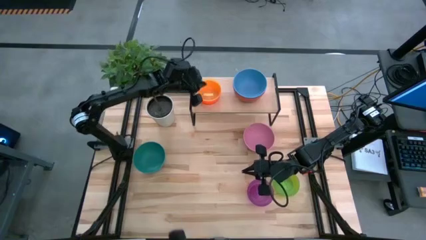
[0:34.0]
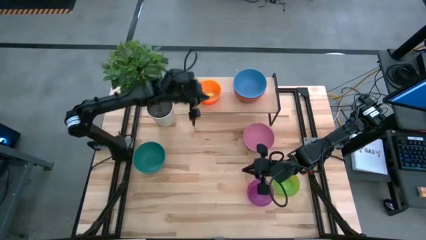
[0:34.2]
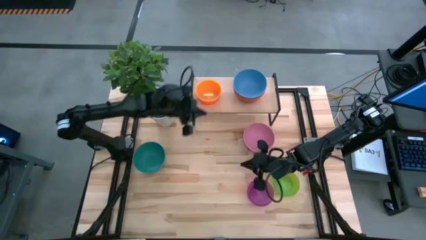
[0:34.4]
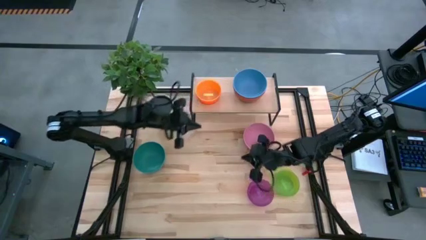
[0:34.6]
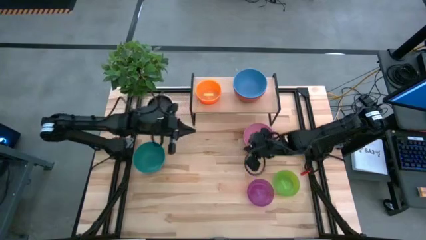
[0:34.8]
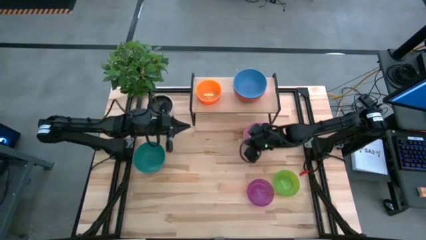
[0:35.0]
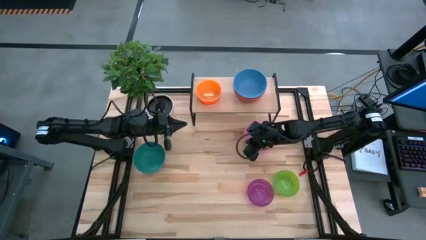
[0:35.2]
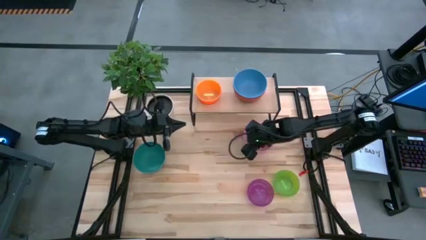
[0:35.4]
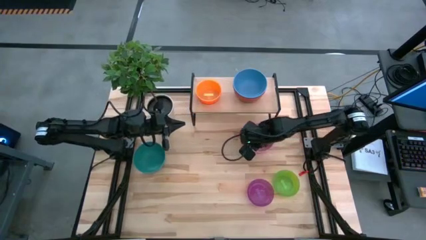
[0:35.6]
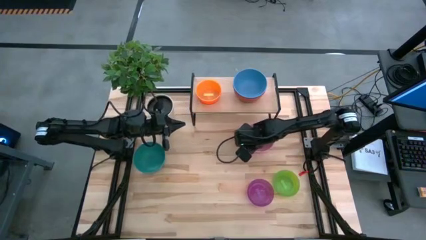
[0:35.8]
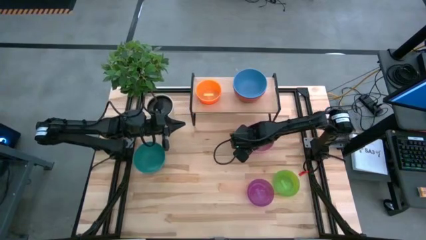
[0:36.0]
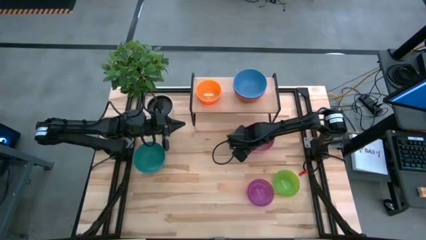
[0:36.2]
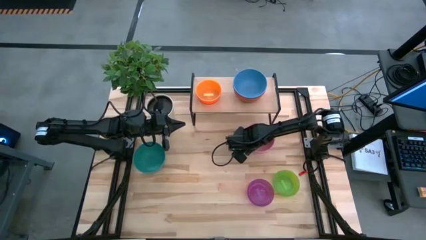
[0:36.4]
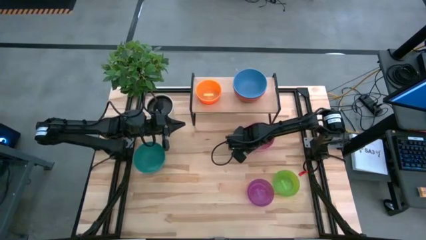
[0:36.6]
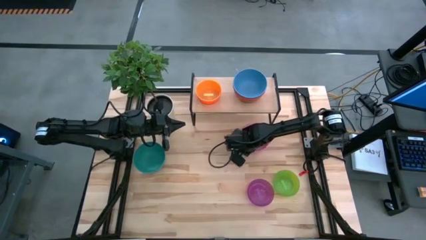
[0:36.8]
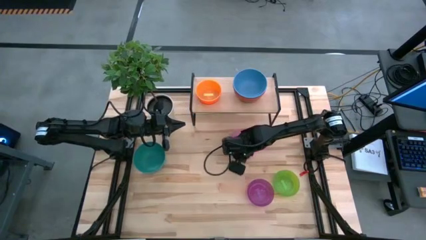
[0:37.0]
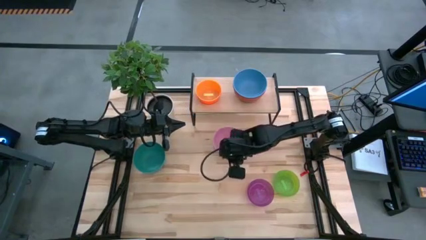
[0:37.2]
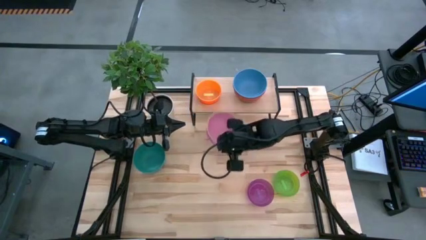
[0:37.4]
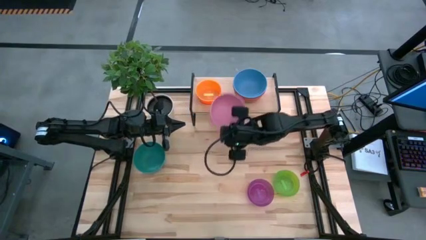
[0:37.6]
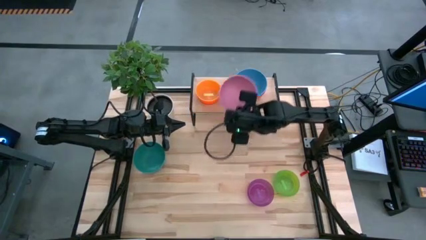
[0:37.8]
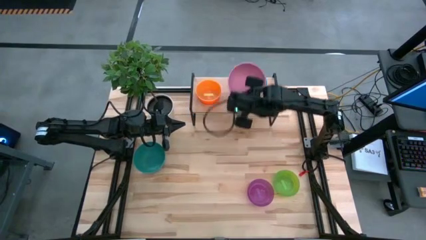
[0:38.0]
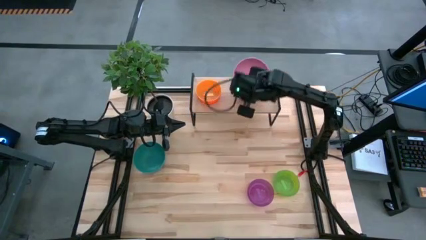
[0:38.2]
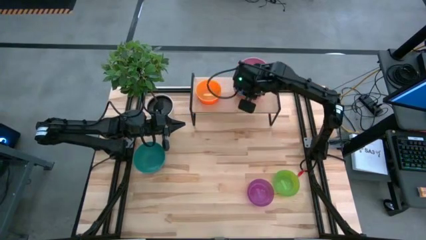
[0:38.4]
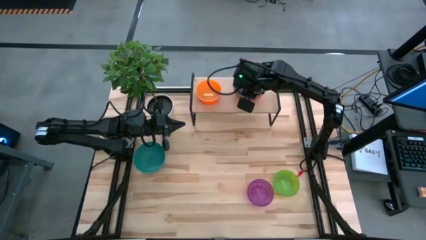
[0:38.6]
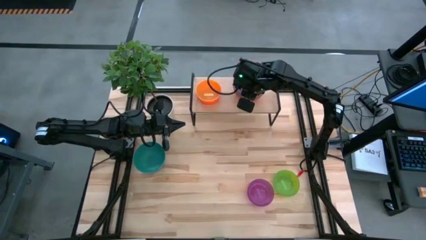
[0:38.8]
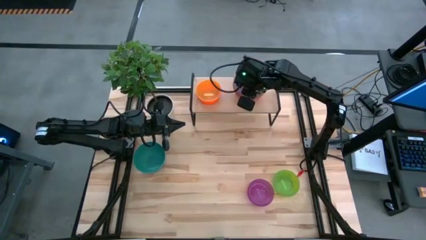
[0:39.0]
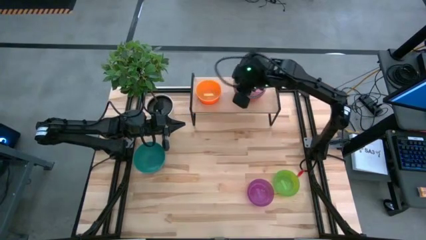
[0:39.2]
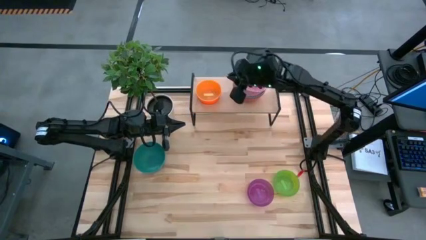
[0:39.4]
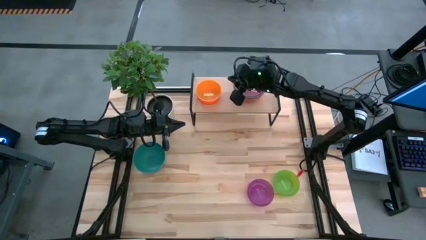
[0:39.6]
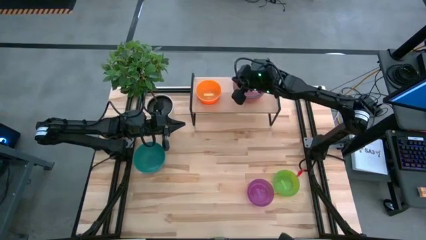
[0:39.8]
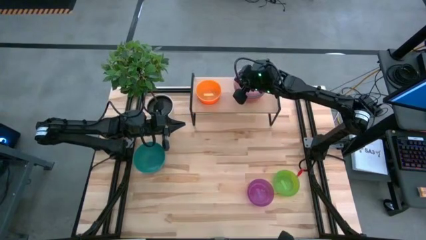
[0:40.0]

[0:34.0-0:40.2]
Task: Place and stack bowls onto a shelf
Stack the pink bowl into the blue bowl on the shelf

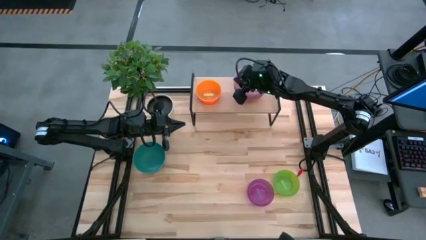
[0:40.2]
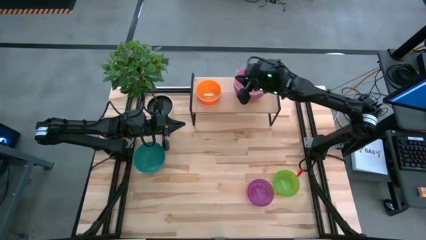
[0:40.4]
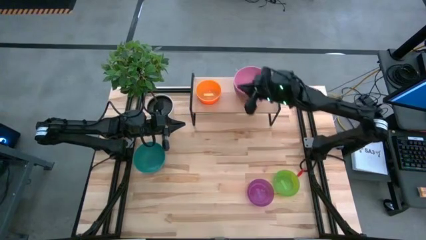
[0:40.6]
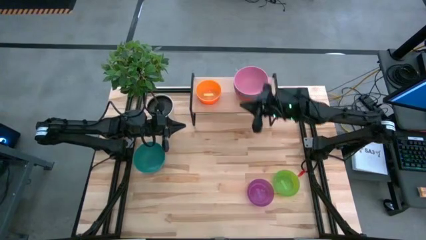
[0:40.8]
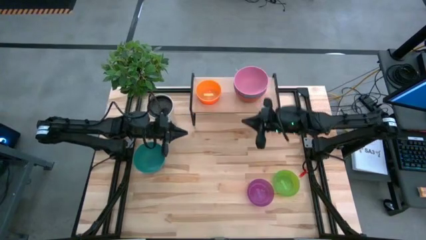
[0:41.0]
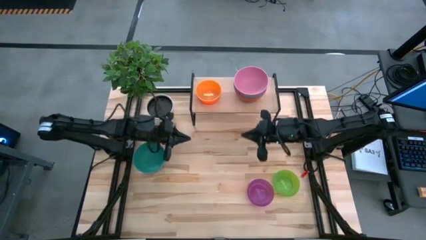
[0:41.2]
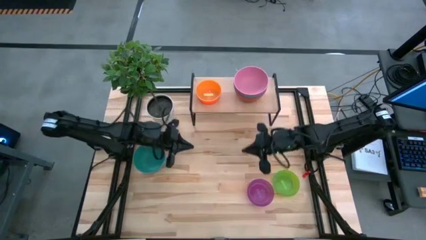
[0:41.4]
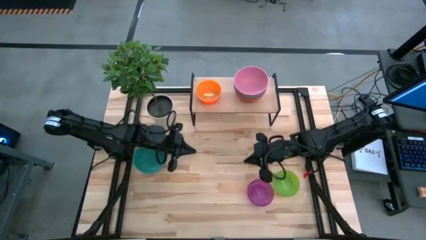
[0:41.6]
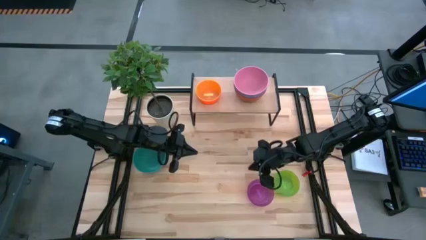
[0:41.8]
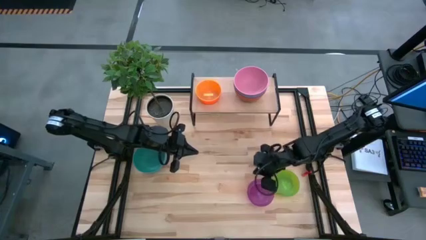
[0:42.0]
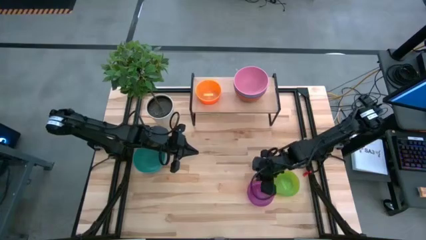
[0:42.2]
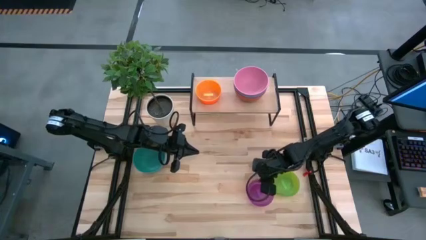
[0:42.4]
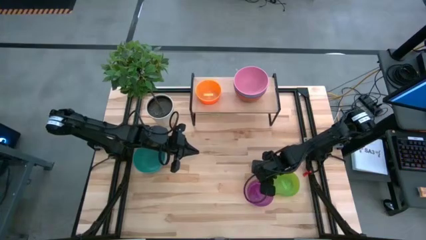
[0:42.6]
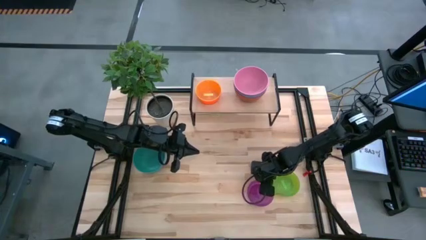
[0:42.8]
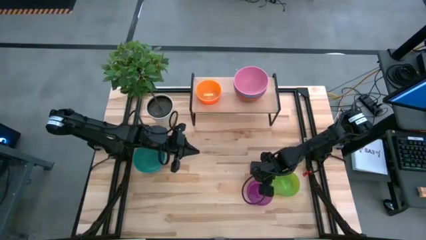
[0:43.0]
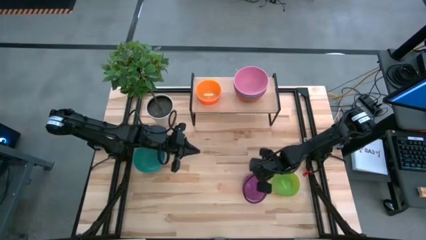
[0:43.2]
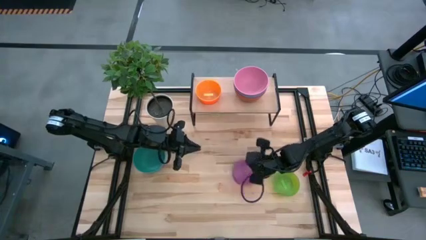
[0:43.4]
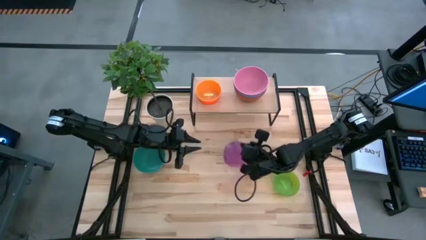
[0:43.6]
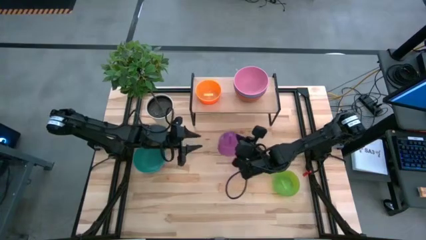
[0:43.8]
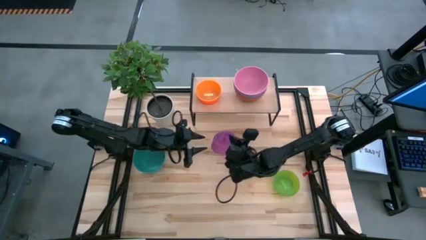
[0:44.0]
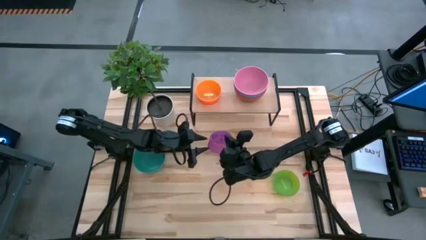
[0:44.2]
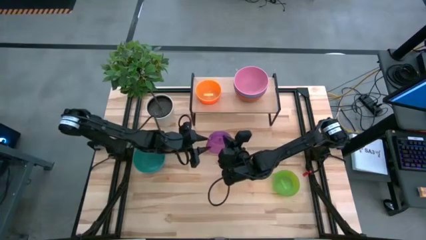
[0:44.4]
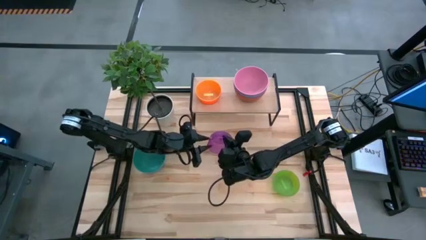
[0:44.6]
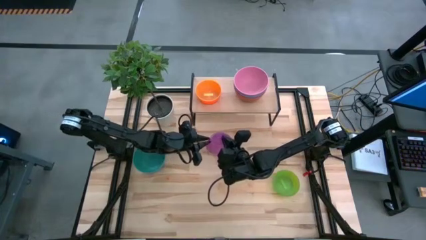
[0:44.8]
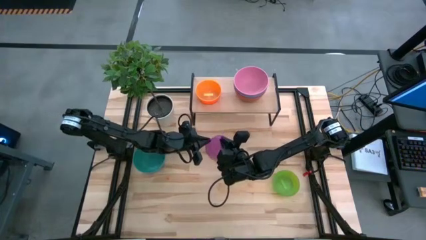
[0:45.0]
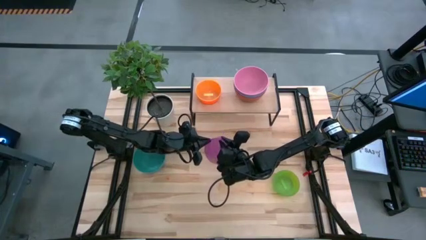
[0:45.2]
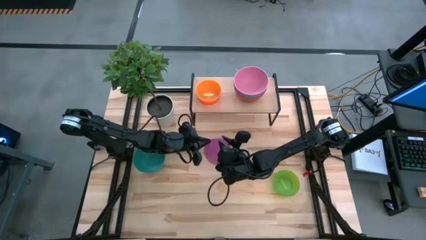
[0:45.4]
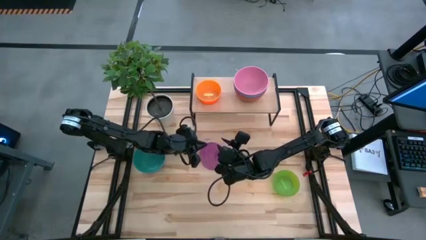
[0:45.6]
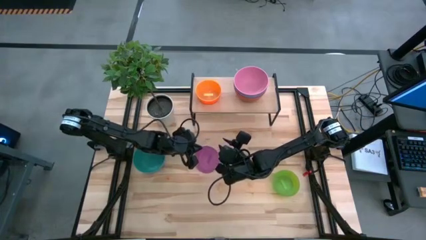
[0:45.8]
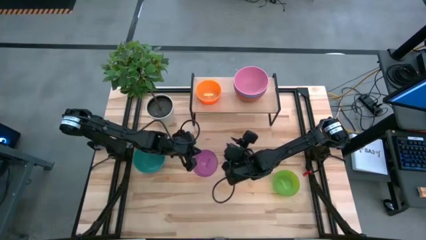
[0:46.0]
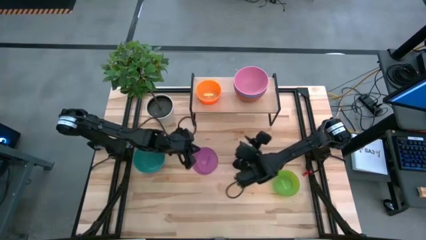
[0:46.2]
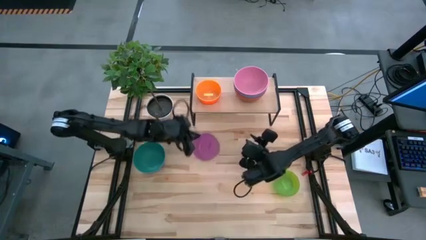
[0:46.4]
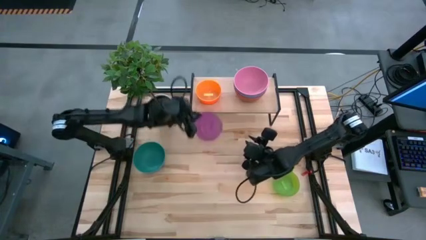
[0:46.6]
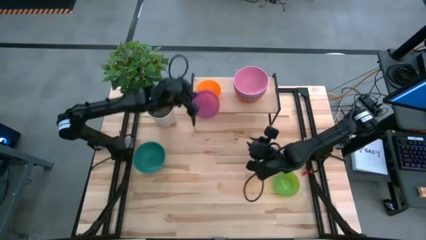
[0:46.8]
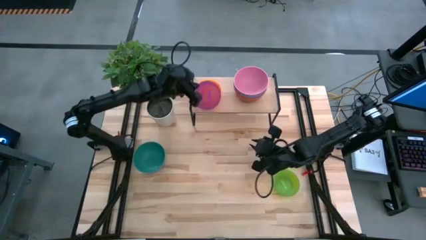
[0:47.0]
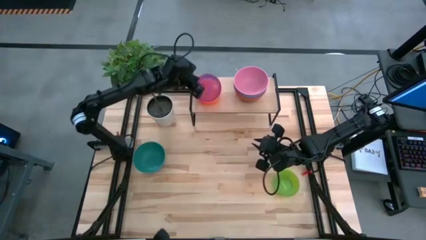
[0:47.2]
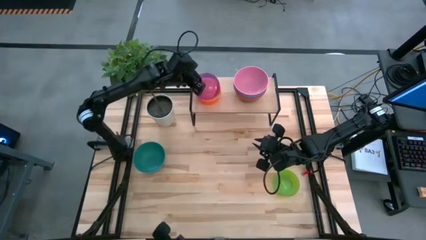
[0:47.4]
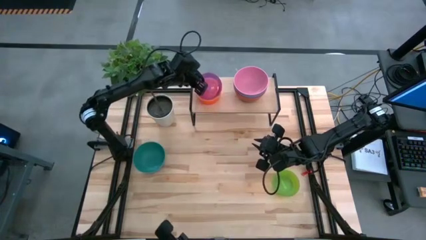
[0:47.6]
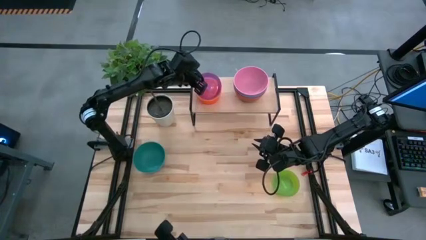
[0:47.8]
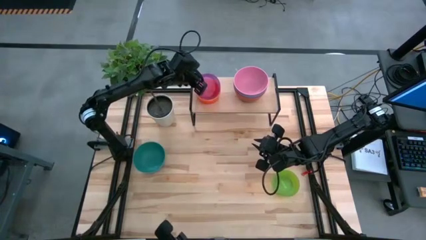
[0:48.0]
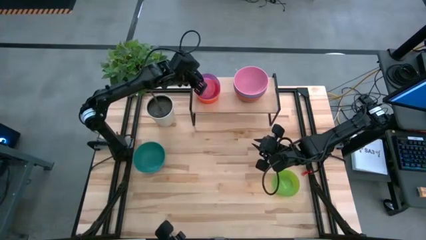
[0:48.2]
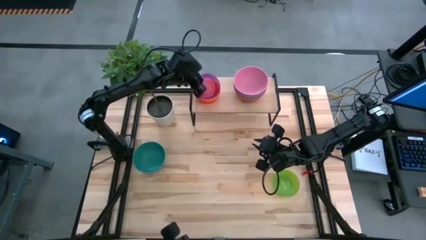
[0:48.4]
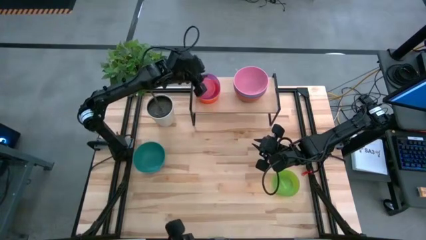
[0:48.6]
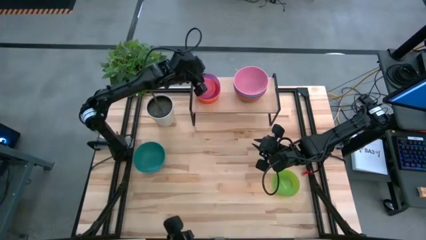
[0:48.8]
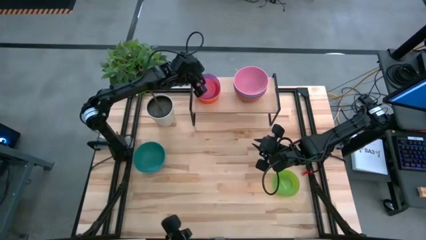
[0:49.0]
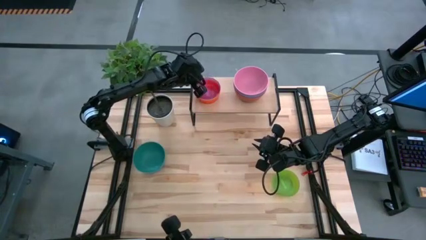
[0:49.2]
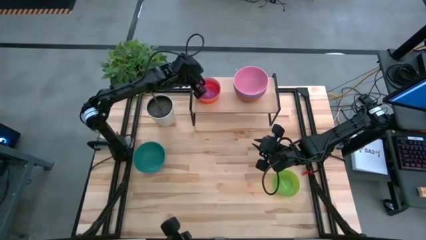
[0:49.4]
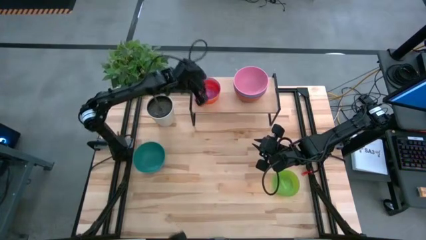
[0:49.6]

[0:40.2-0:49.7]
Stack the purple bowl into the transparent yellow bowl on the shelf
